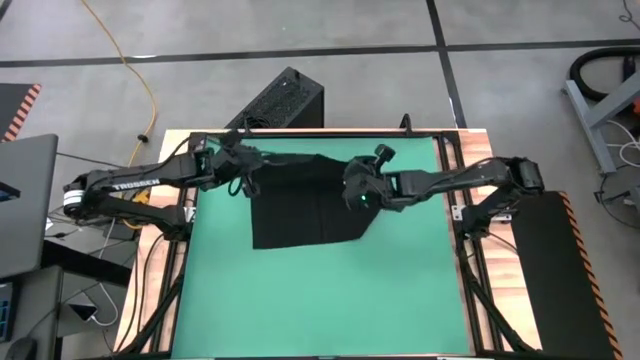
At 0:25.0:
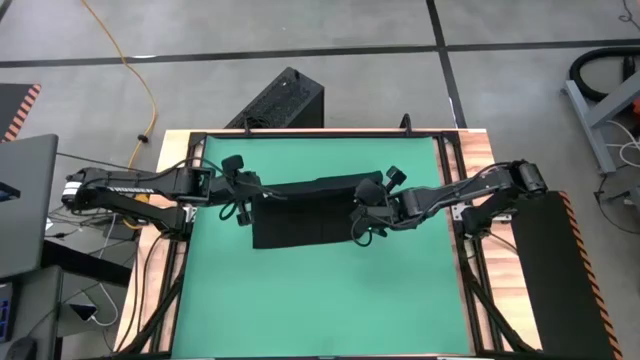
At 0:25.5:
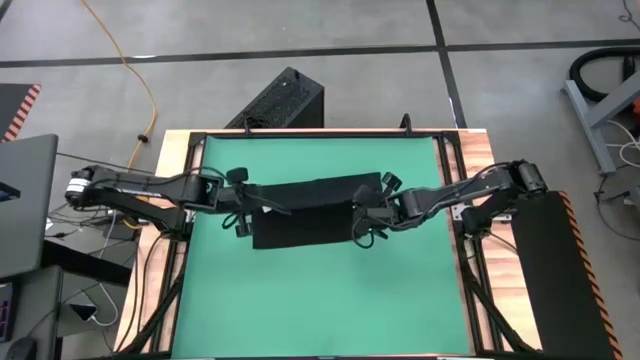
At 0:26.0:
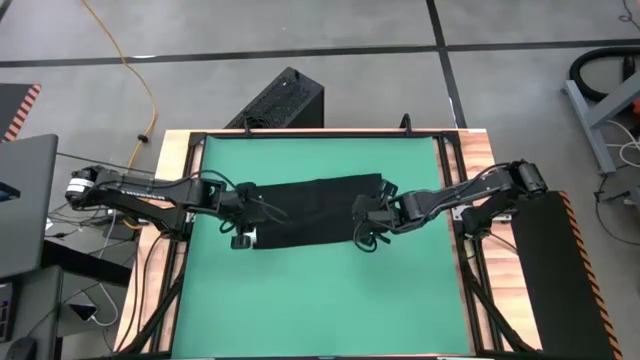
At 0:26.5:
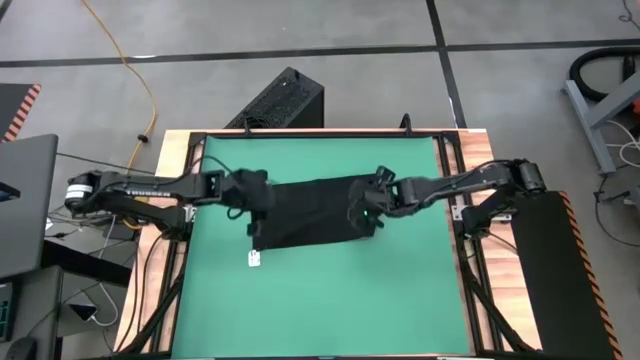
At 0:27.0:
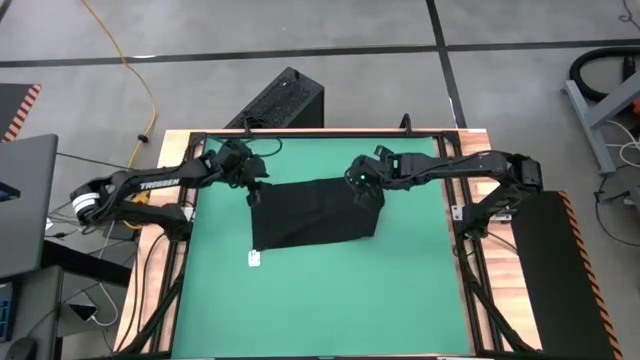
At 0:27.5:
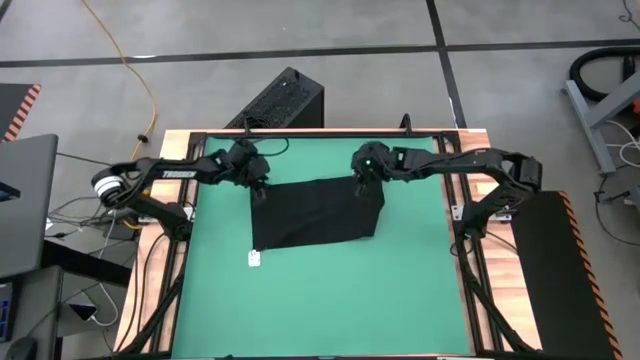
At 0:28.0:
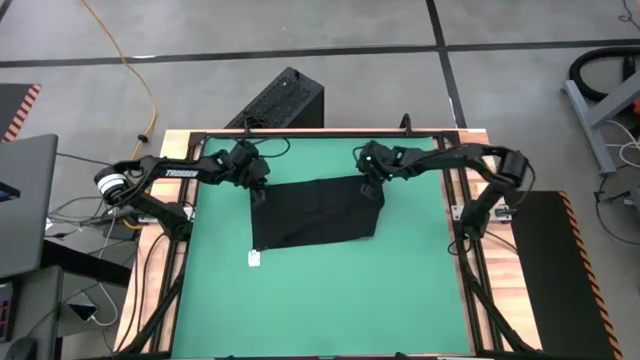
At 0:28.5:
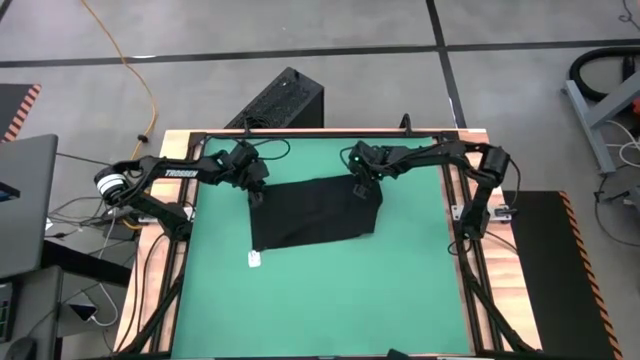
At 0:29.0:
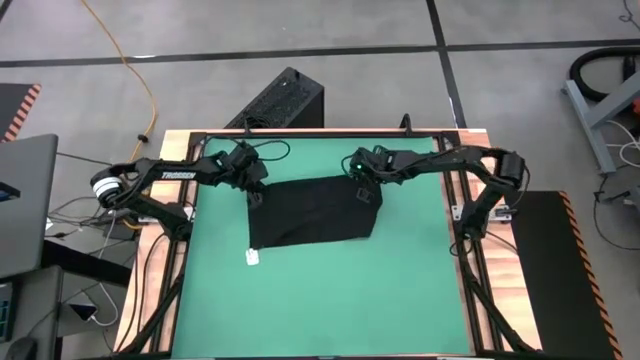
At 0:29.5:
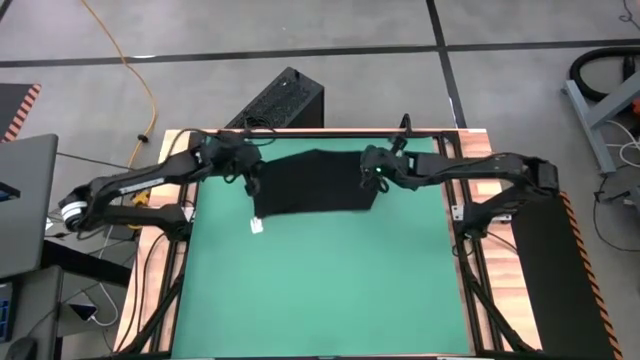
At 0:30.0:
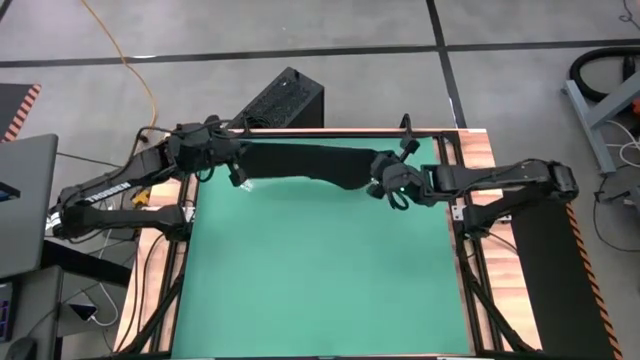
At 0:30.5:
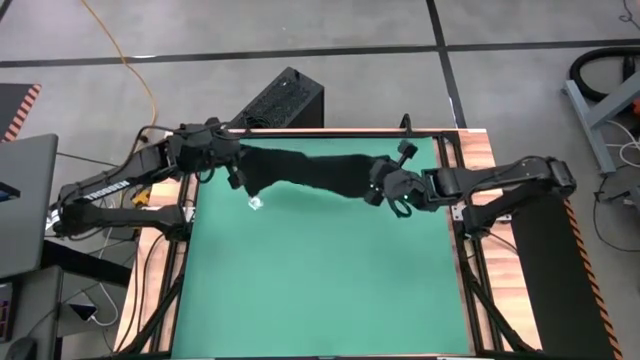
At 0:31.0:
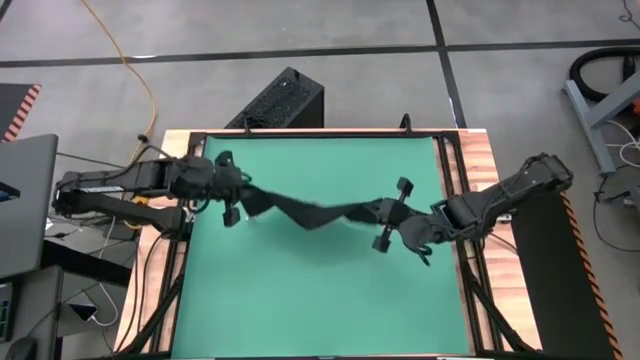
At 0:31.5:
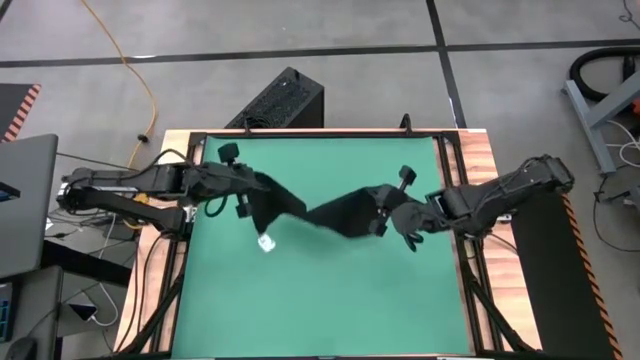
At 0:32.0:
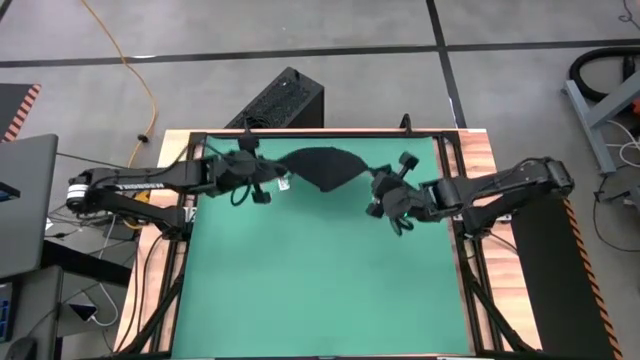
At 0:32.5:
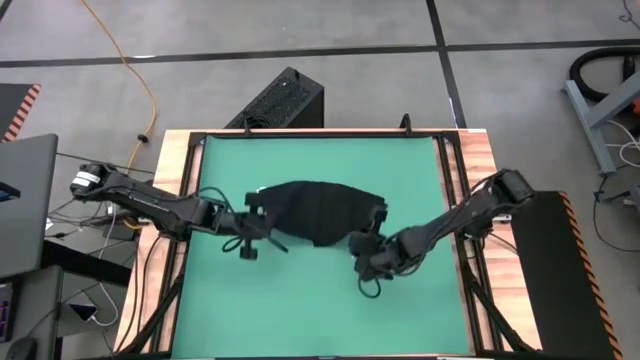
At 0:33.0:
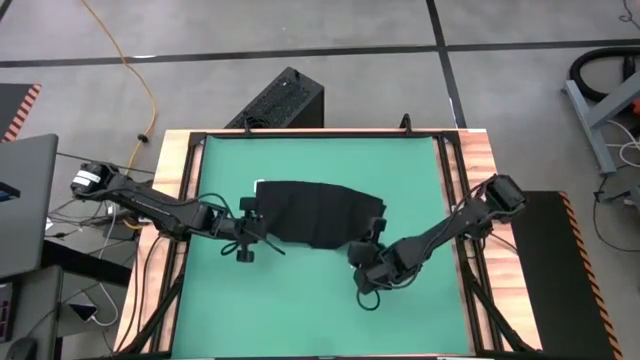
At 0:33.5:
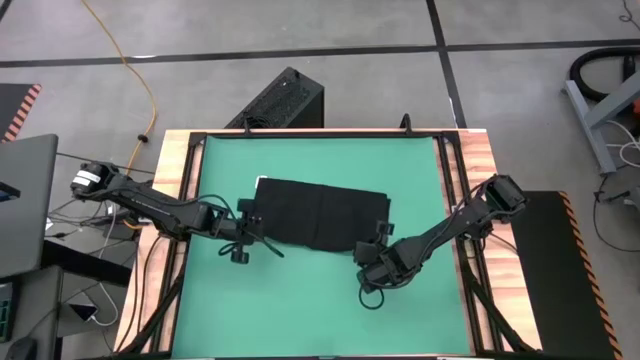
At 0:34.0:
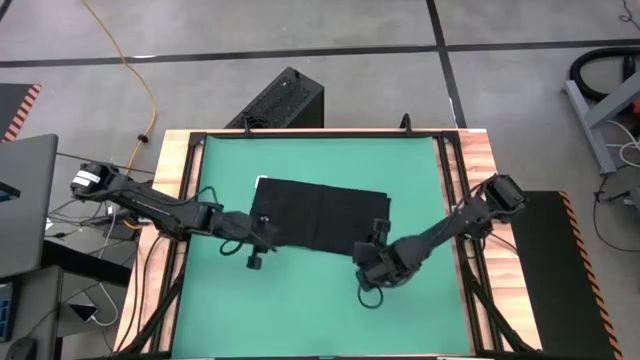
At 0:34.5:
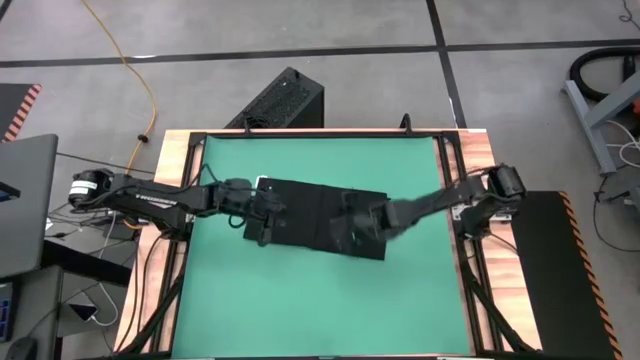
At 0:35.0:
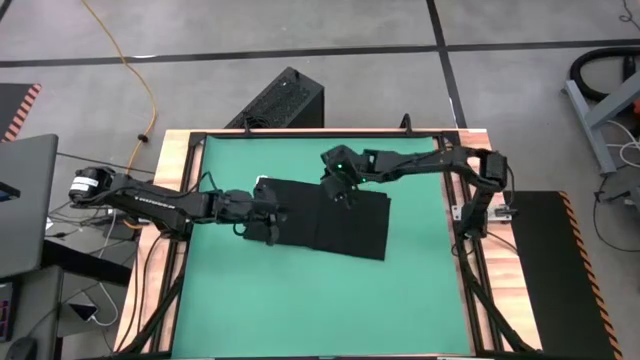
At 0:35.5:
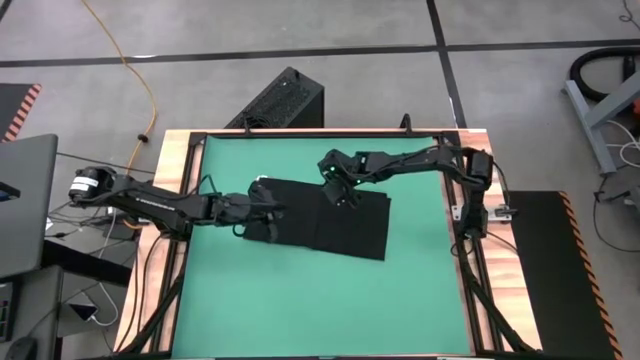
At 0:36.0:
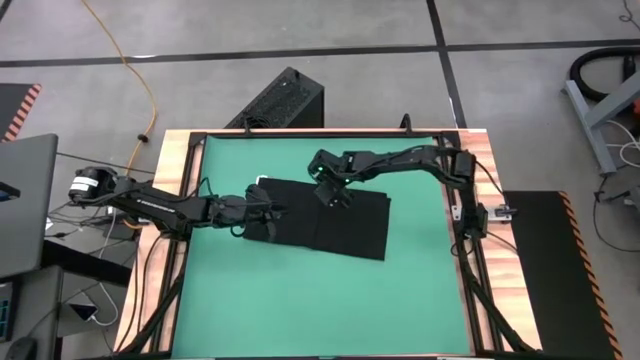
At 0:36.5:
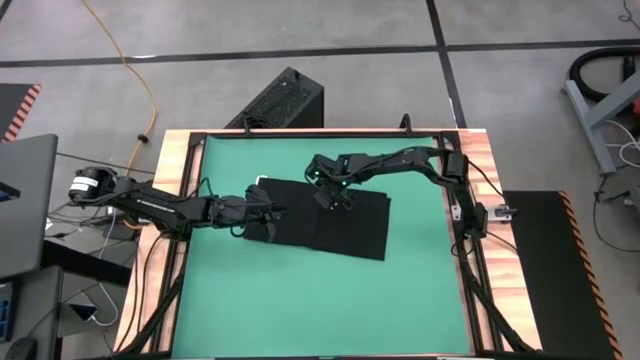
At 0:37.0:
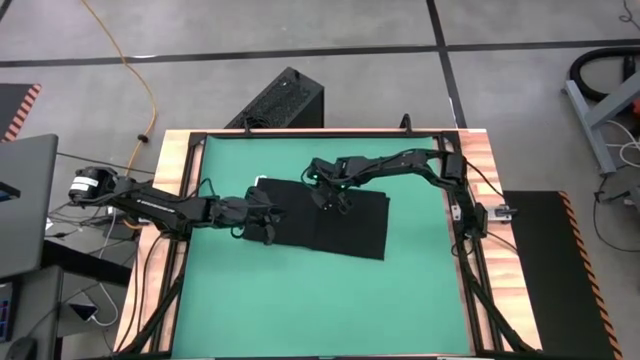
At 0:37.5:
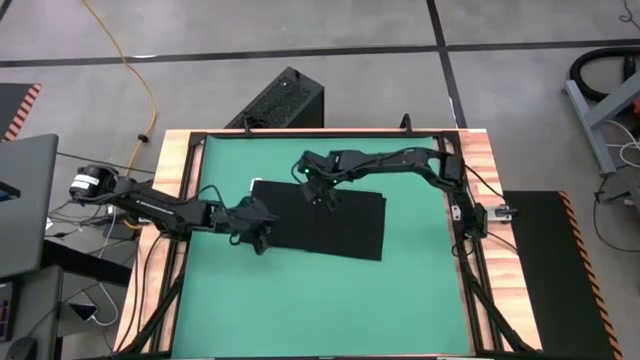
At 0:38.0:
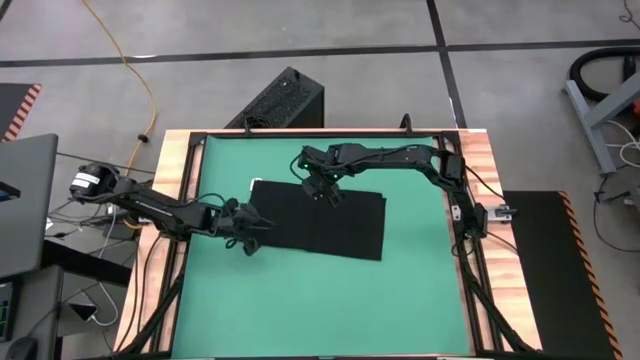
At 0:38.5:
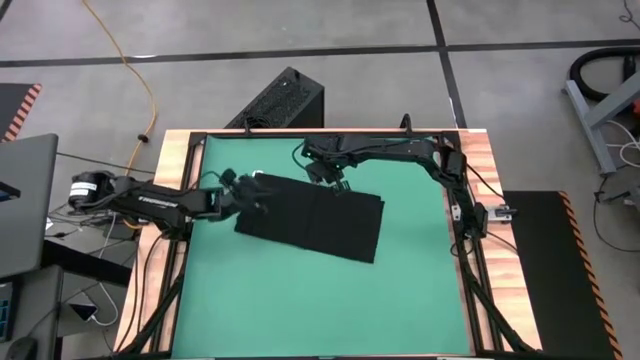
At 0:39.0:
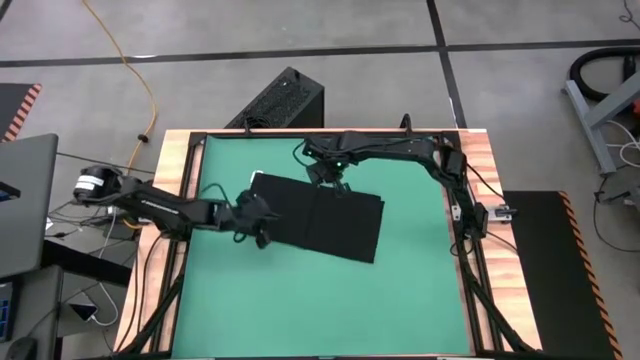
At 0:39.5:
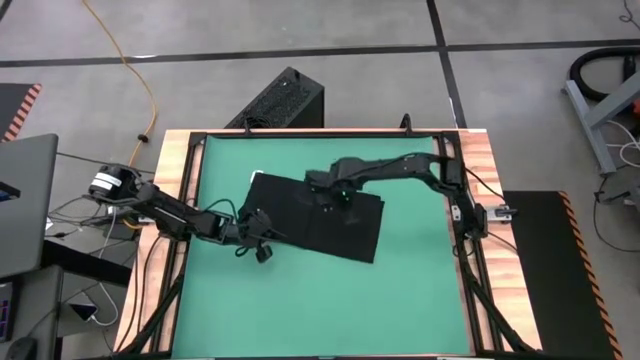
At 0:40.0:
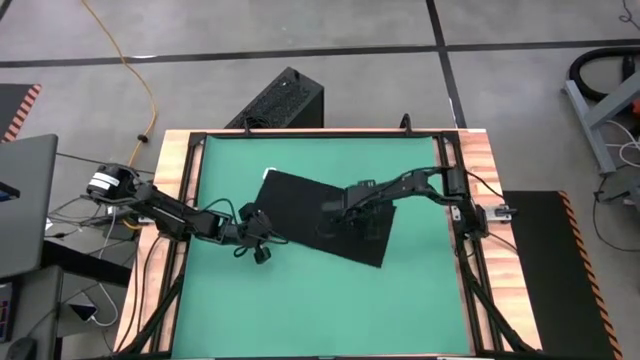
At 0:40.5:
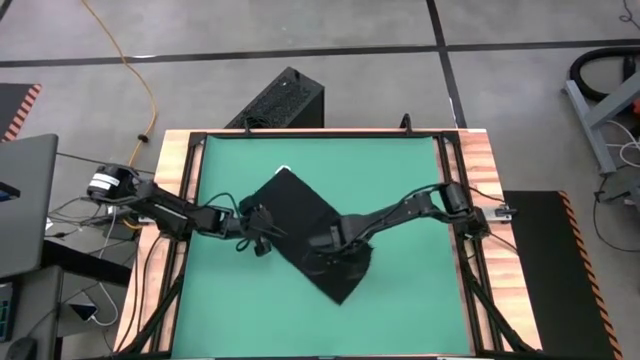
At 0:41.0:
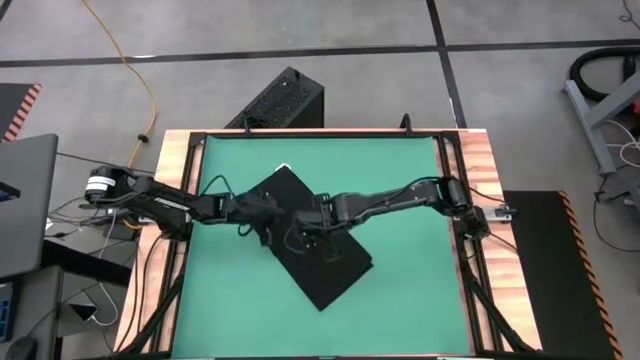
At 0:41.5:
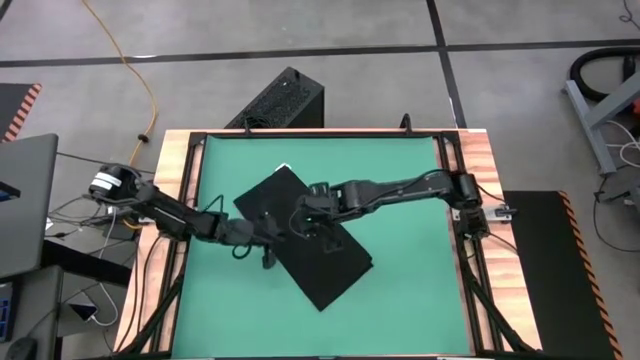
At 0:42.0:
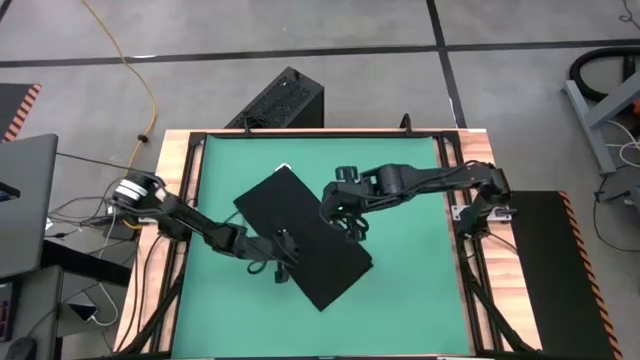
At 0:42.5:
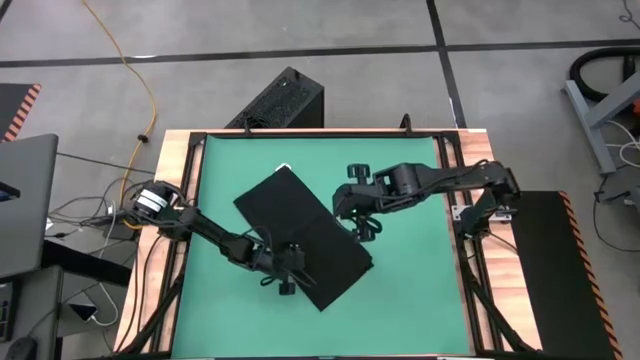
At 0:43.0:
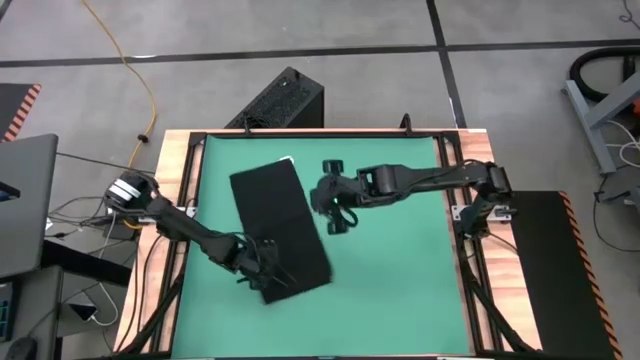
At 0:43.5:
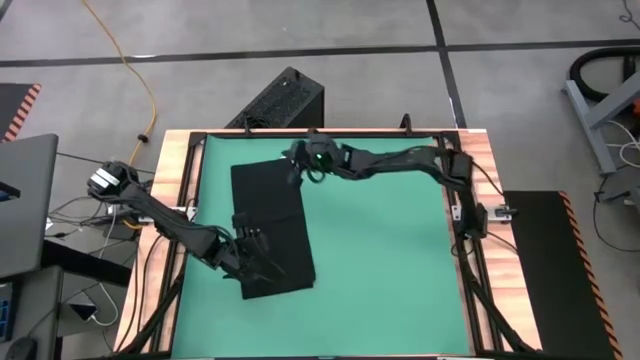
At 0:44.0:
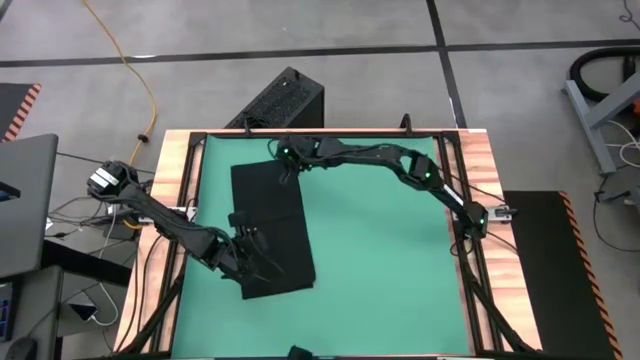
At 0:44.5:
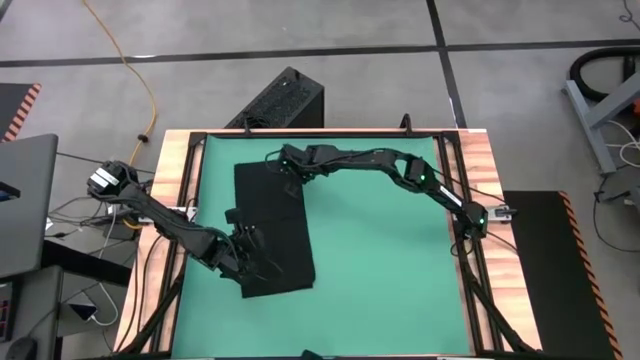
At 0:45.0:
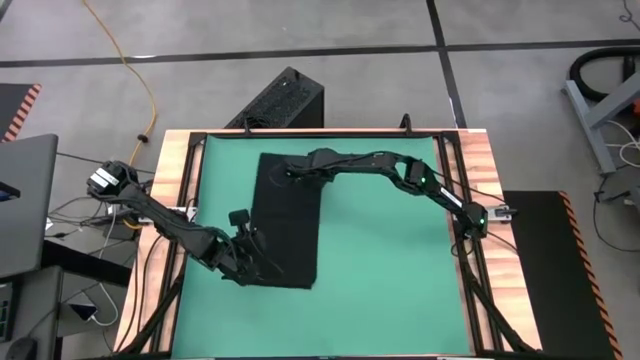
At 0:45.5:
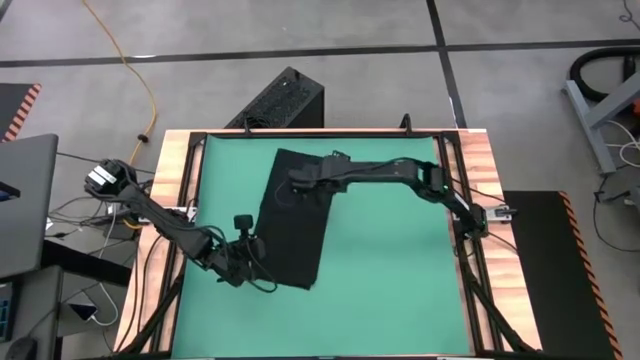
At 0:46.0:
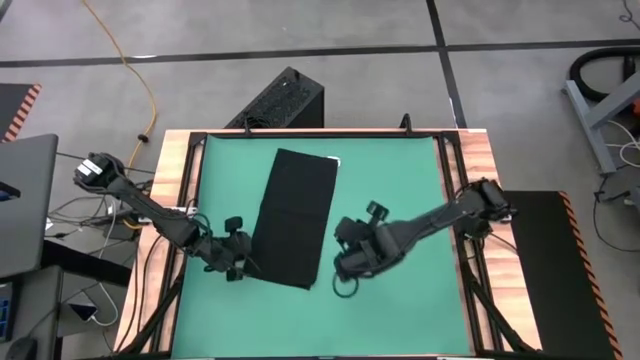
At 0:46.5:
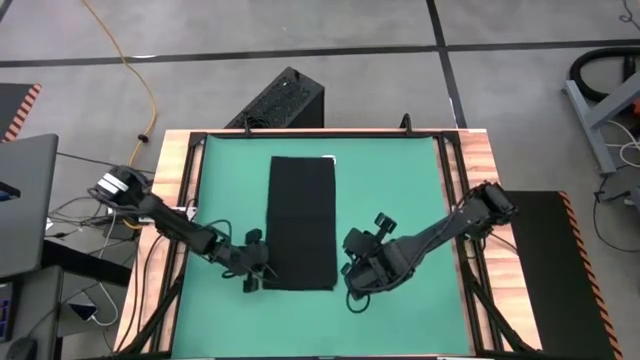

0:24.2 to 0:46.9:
Task: Roll towel into tight, uniform cylinder
Fold the black towel
